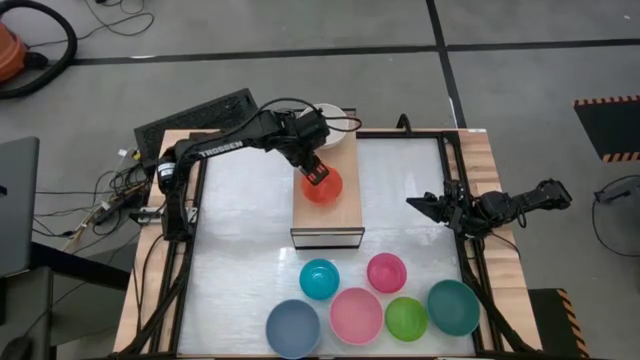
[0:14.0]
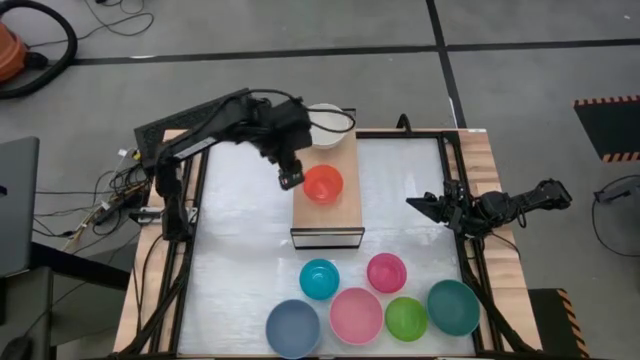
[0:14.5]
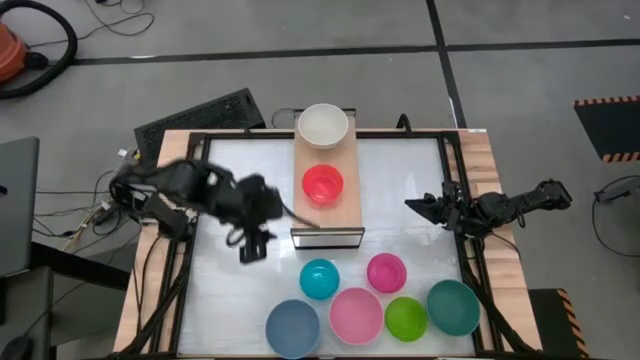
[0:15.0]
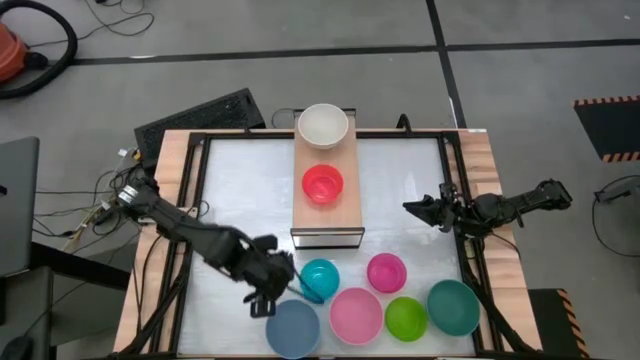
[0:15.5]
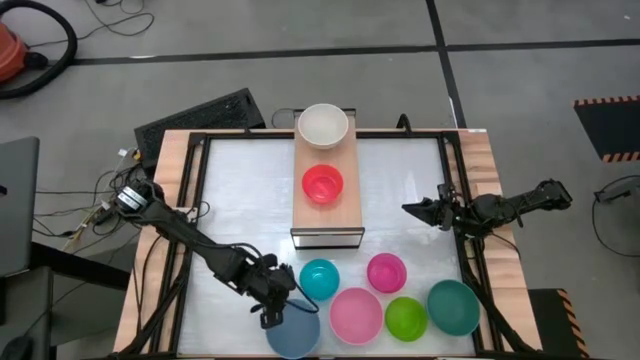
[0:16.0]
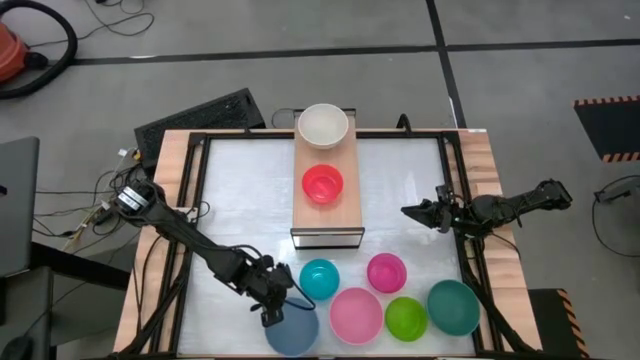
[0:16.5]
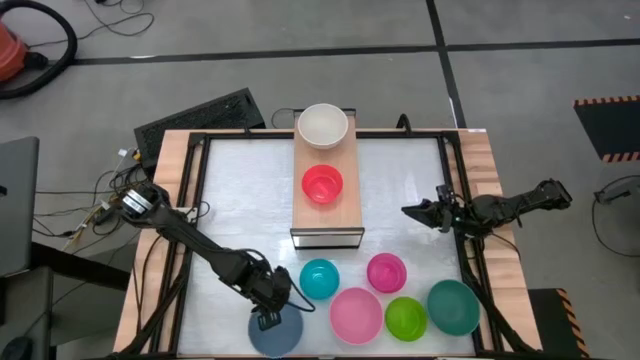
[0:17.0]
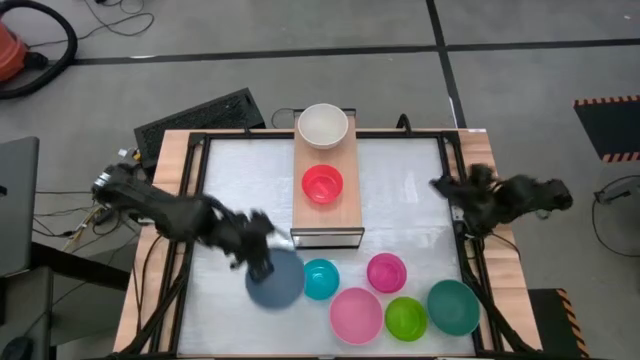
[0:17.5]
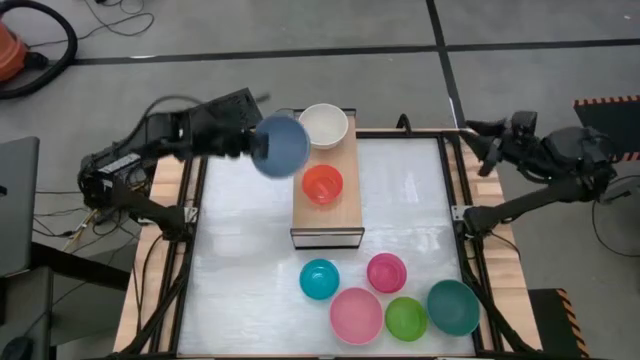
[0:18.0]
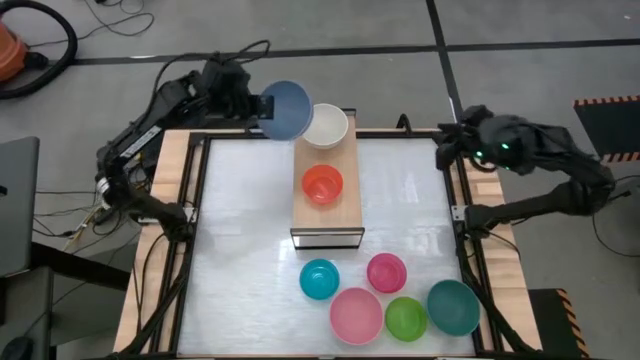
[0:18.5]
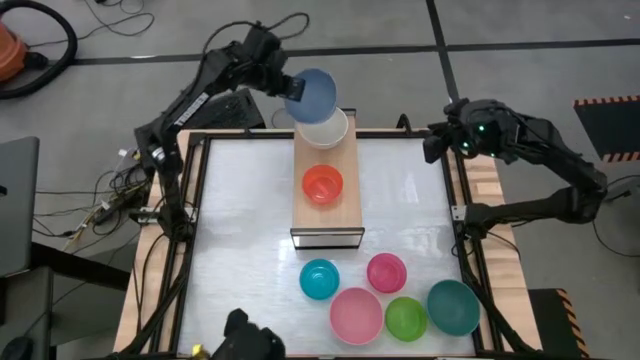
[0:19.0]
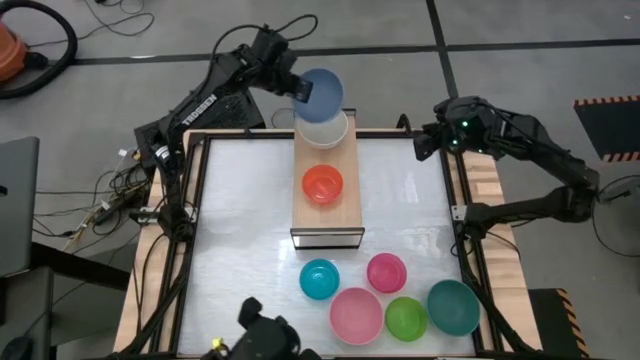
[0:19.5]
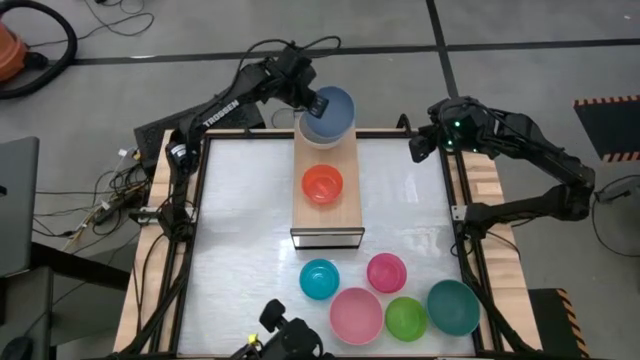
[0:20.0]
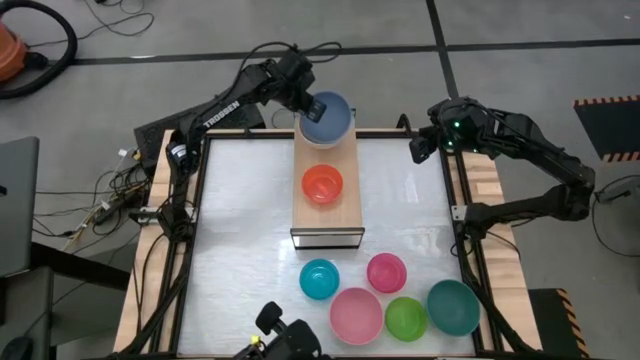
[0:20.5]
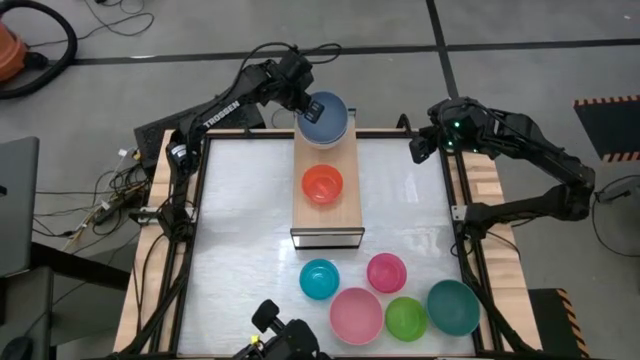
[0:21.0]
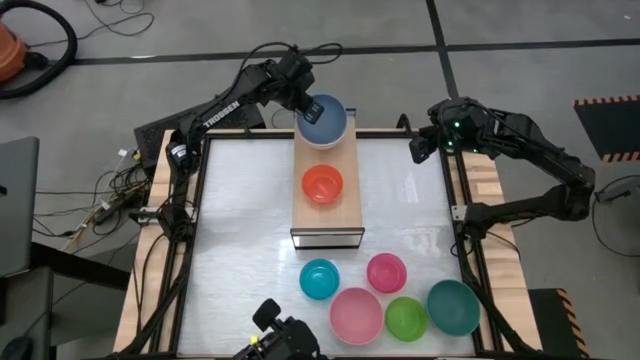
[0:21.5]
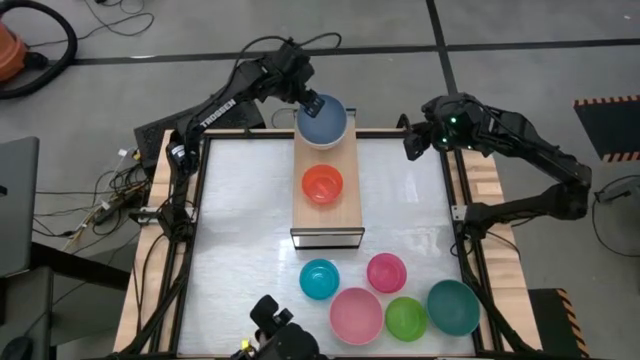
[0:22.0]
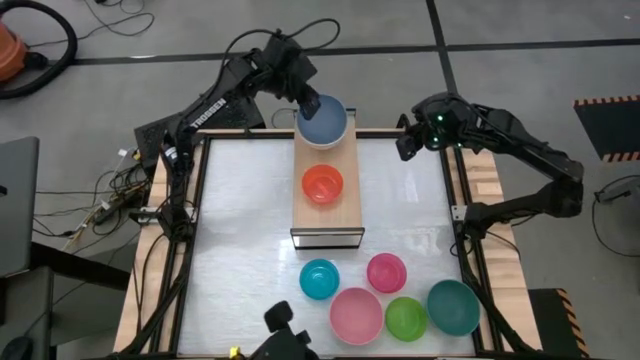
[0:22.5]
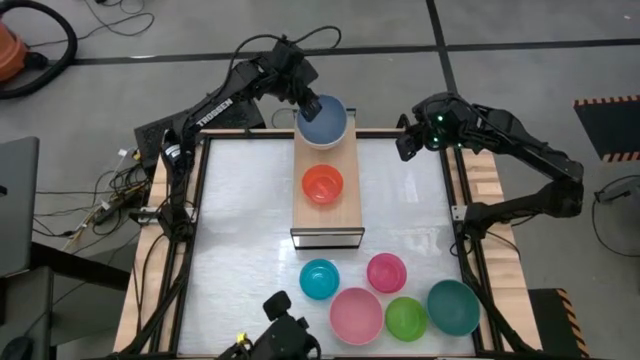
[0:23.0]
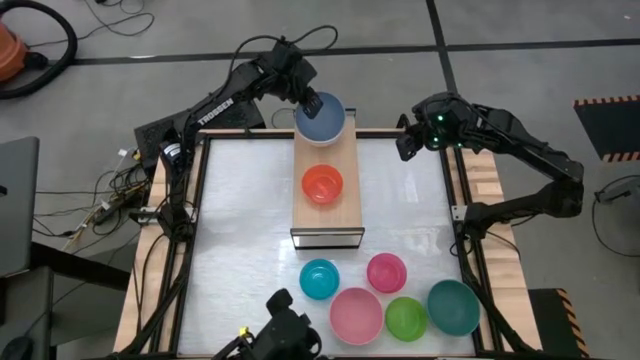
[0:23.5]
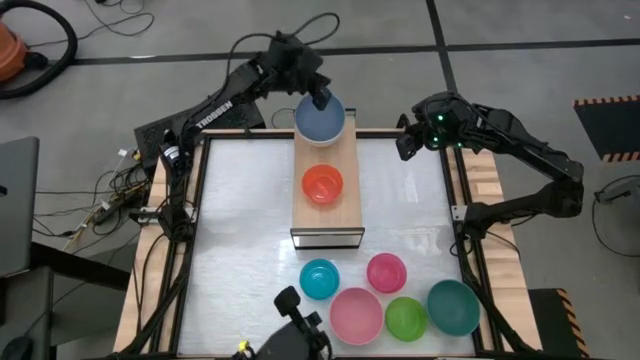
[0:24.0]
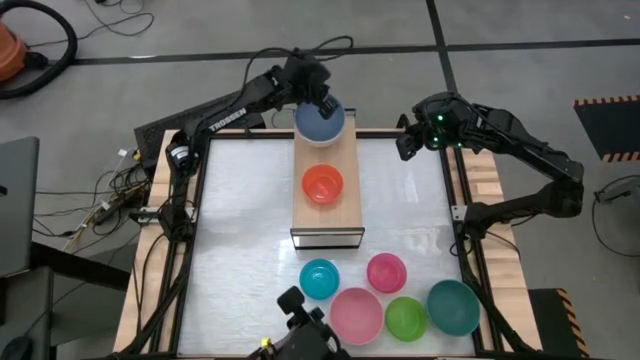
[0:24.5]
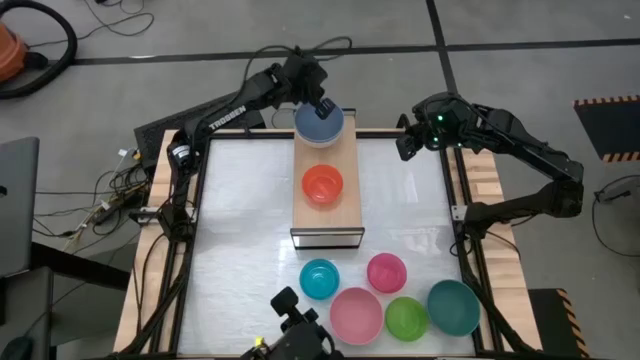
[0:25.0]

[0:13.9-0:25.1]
Task: Place and stack bowls onto a shelf
Stack the blue bowl on top of the white bowl on the shelf

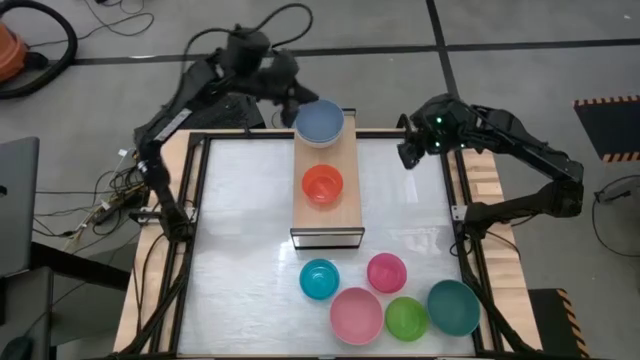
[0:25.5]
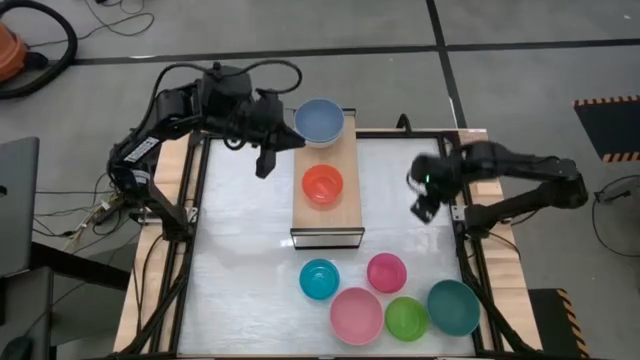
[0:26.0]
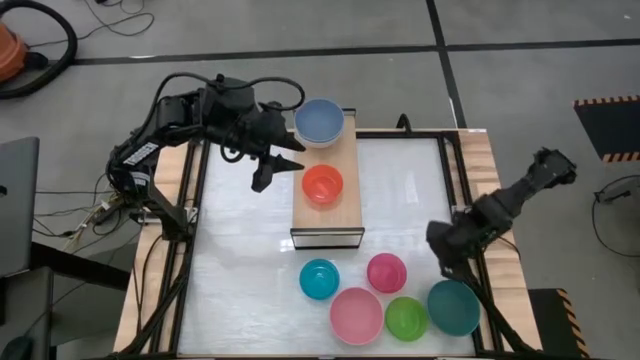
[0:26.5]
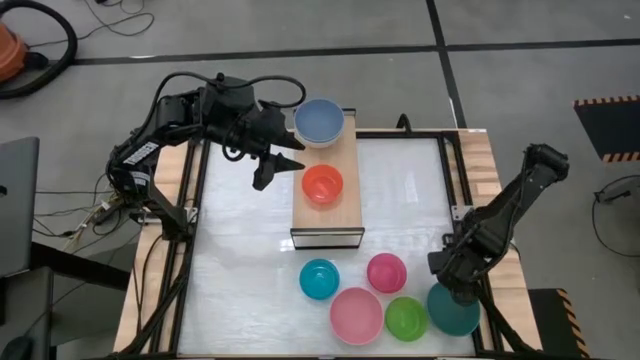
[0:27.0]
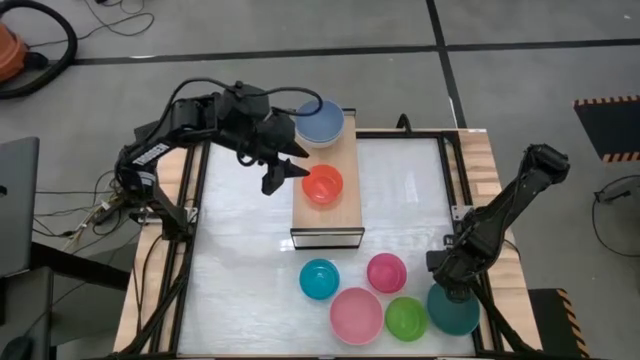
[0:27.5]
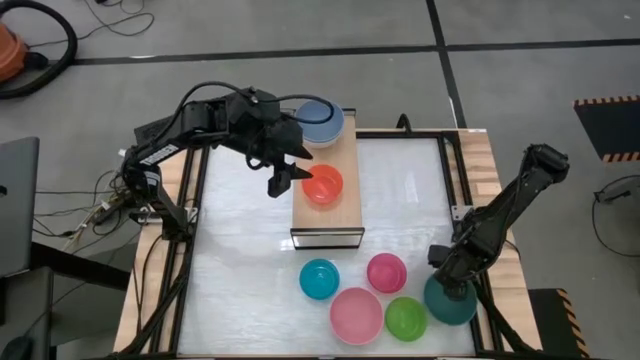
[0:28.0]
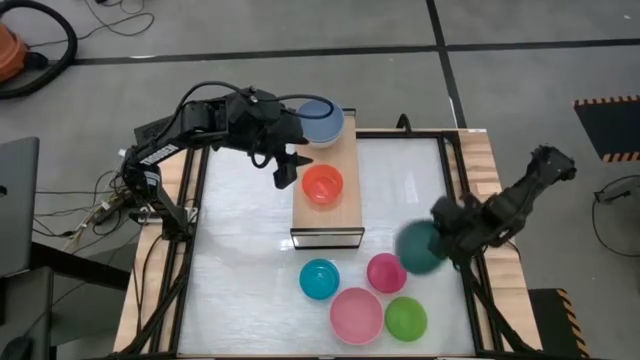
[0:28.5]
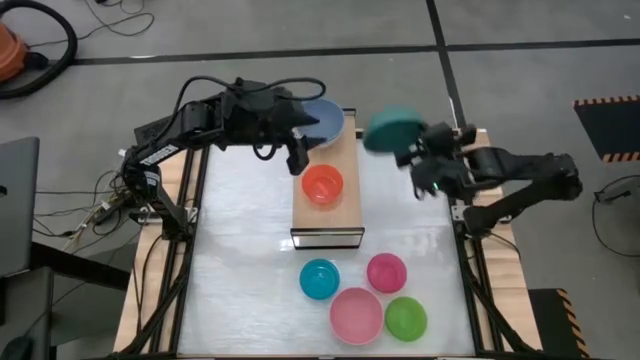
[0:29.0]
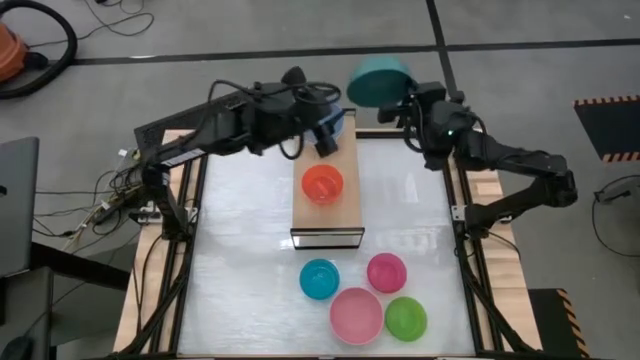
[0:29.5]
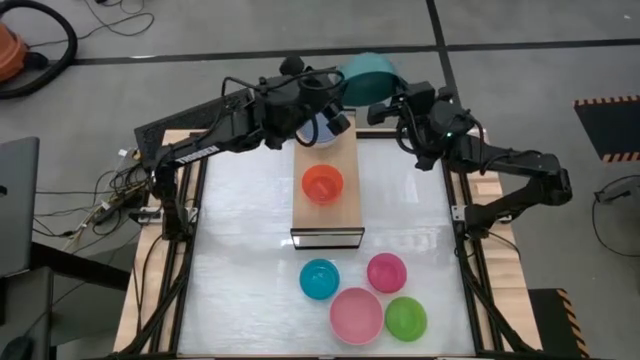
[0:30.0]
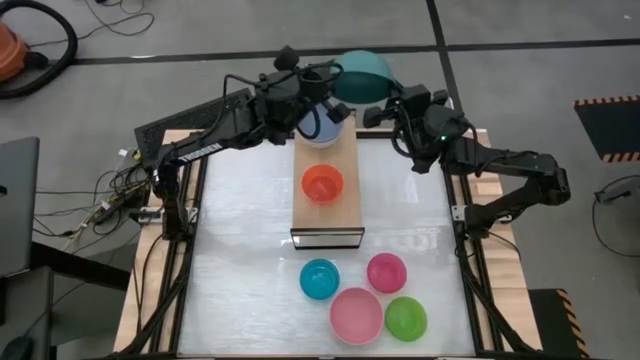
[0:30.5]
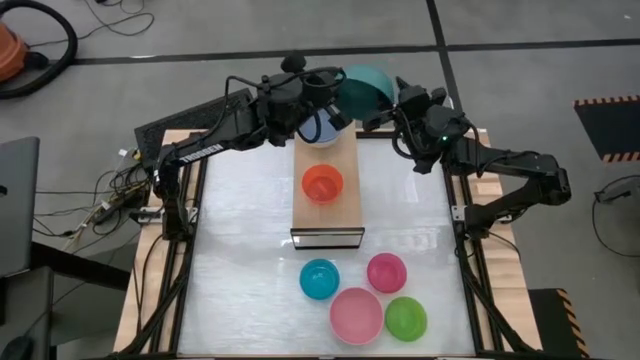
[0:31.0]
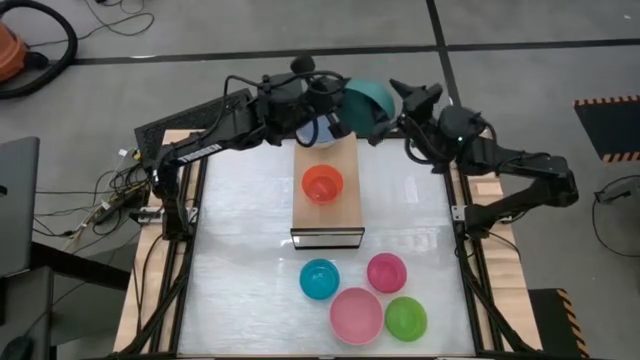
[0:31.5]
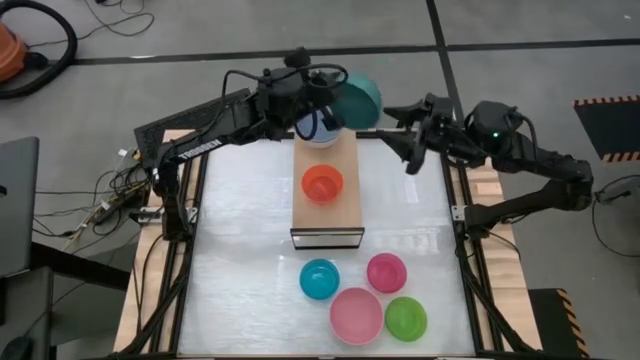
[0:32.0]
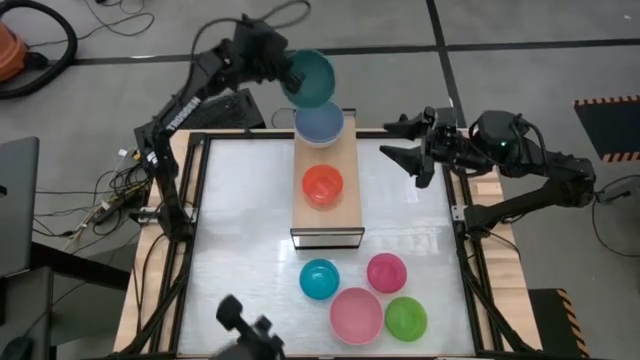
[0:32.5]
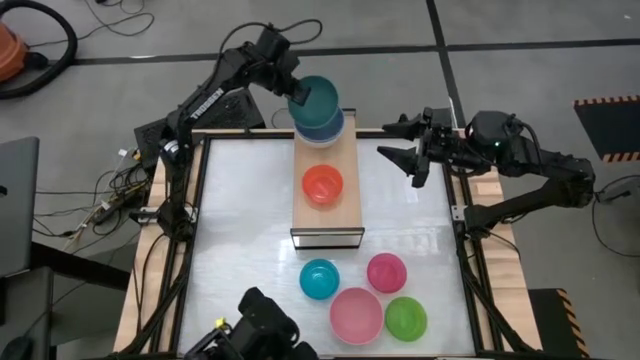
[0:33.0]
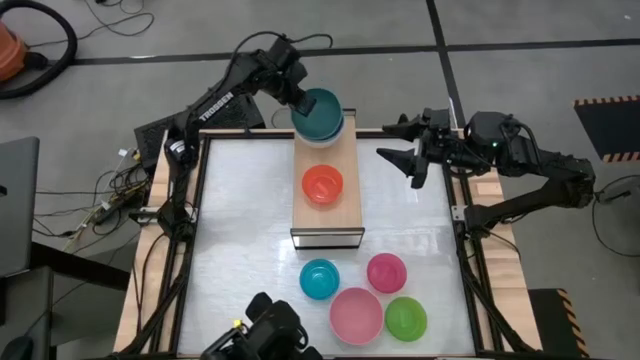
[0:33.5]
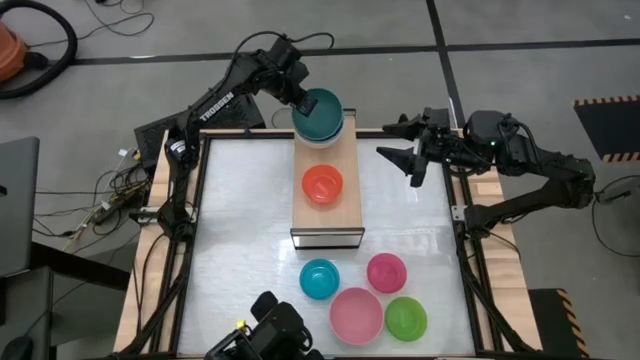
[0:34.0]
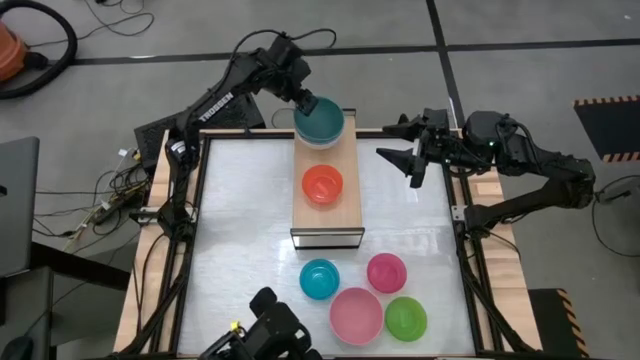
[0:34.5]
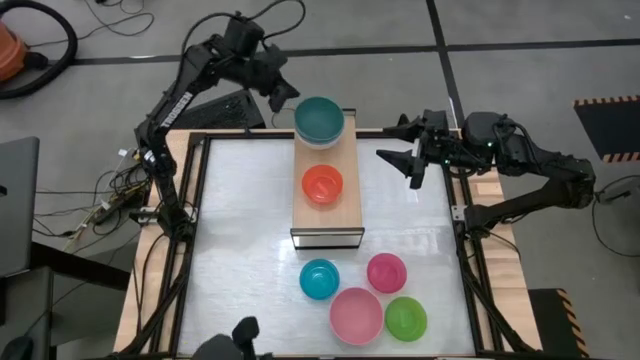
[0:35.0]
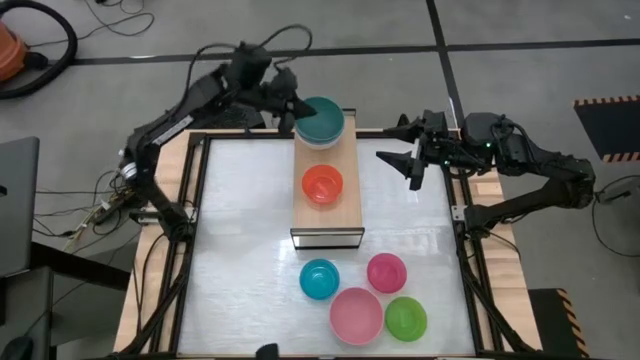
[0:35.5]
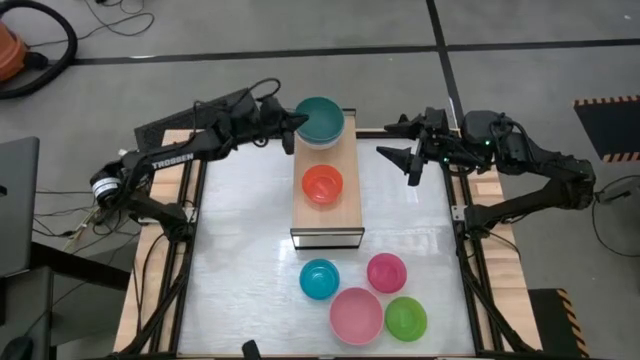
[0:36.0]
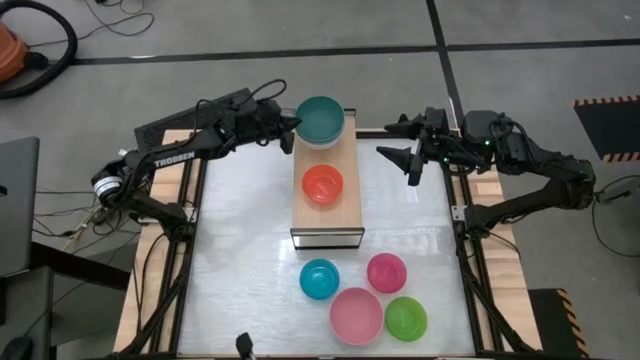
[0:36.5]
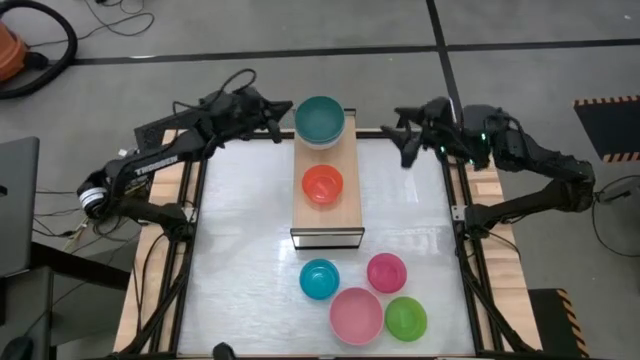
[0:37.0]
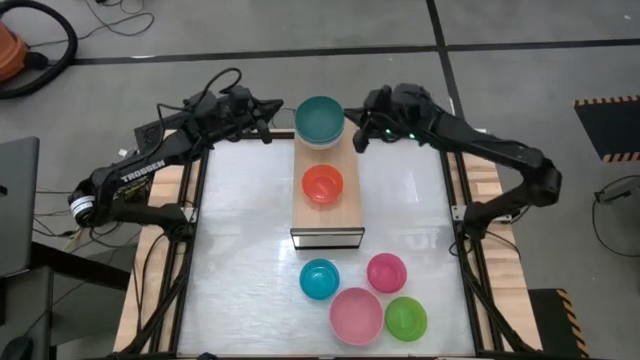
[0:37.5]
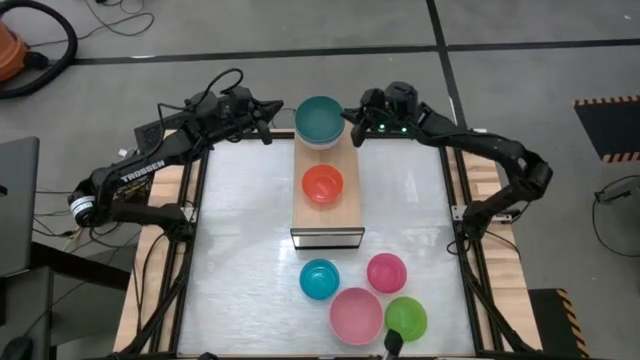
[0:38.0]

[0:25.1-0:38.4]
Stack the dark green bowl on top of the blue bowl on the shelf
